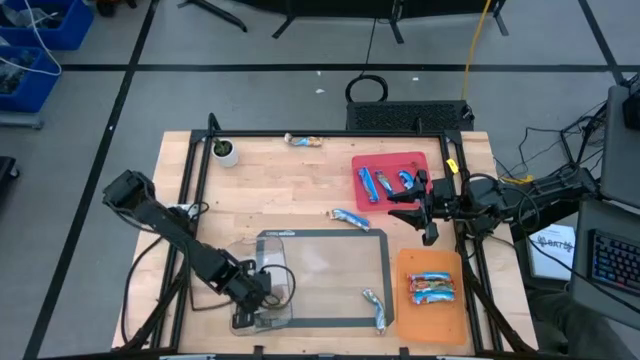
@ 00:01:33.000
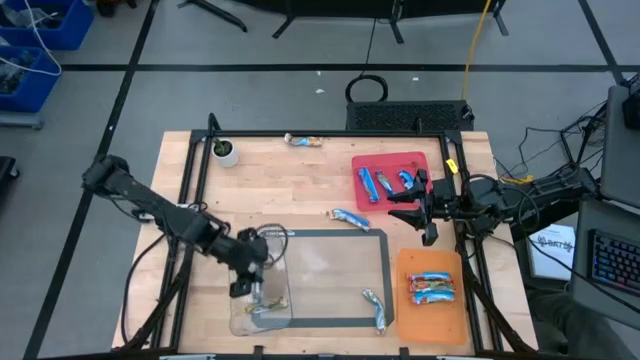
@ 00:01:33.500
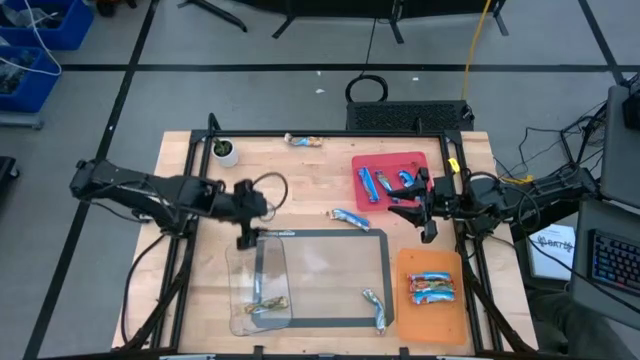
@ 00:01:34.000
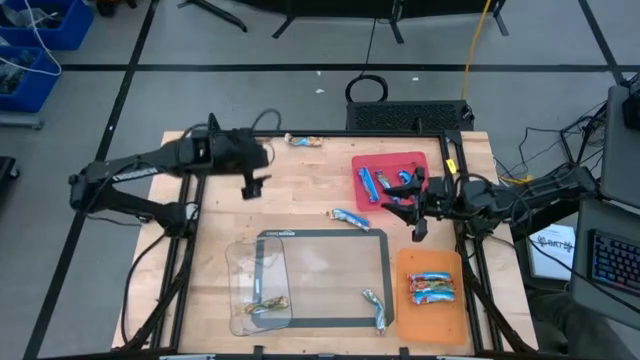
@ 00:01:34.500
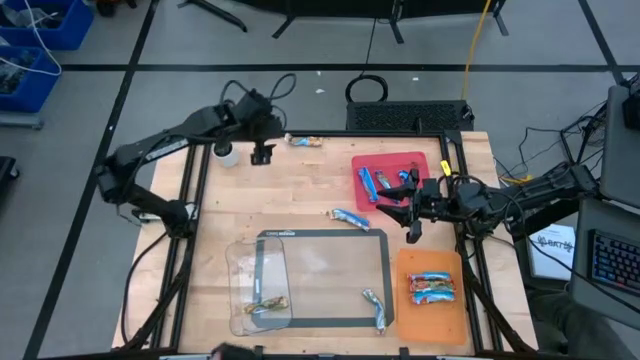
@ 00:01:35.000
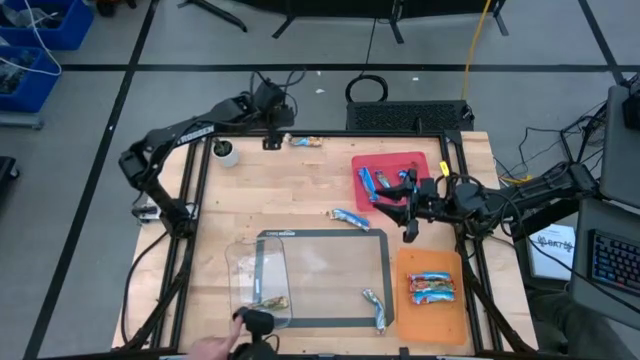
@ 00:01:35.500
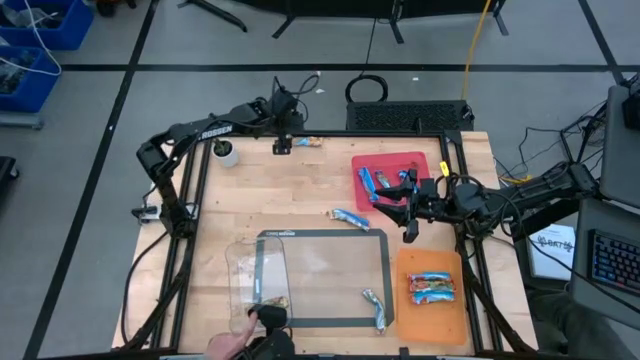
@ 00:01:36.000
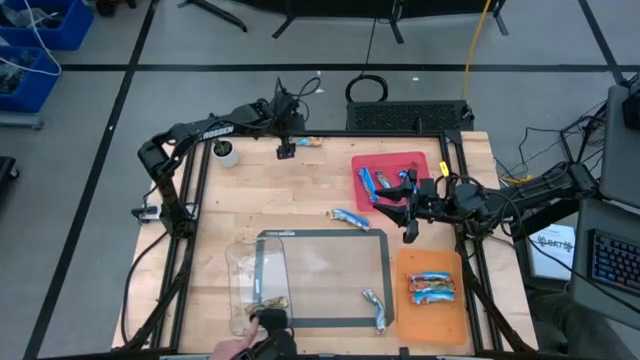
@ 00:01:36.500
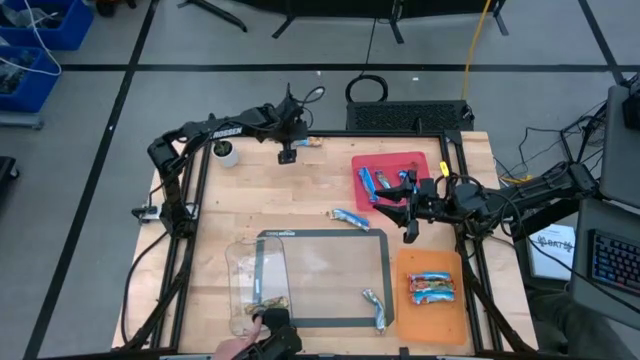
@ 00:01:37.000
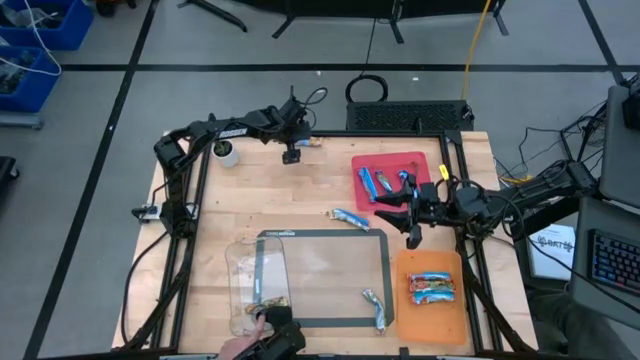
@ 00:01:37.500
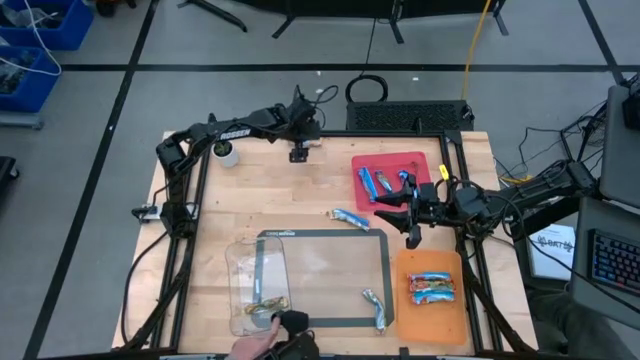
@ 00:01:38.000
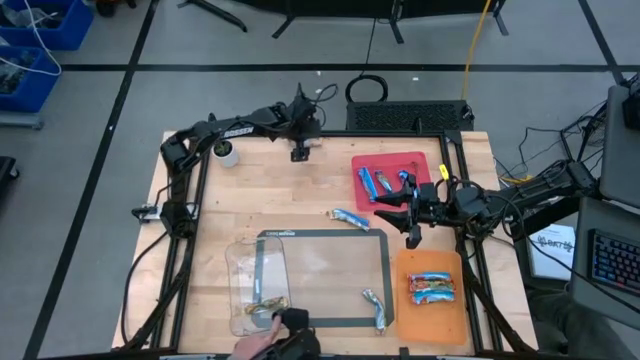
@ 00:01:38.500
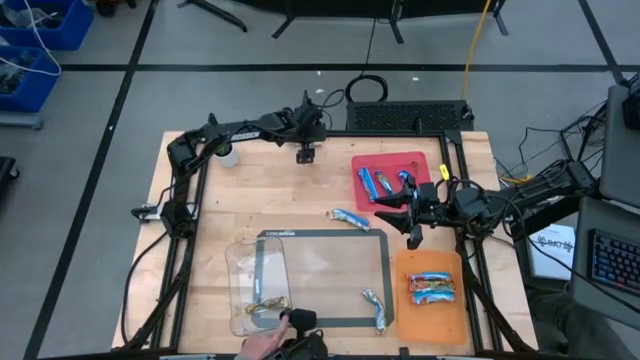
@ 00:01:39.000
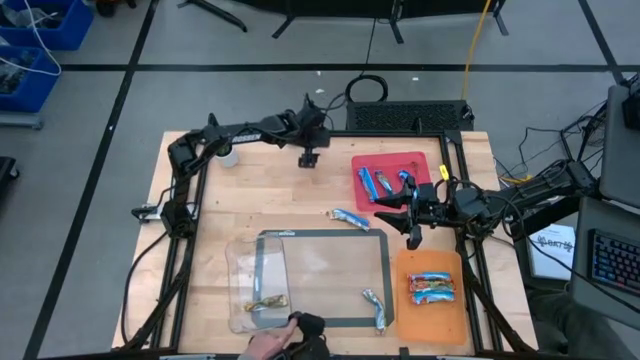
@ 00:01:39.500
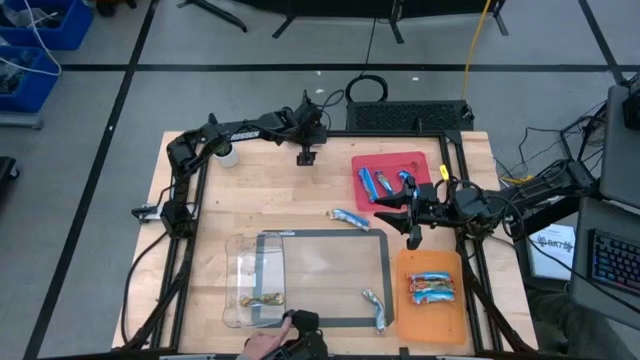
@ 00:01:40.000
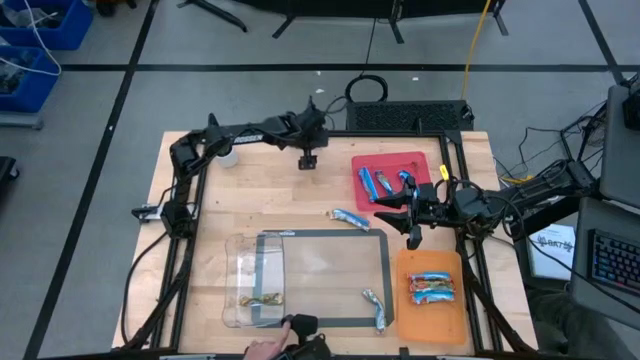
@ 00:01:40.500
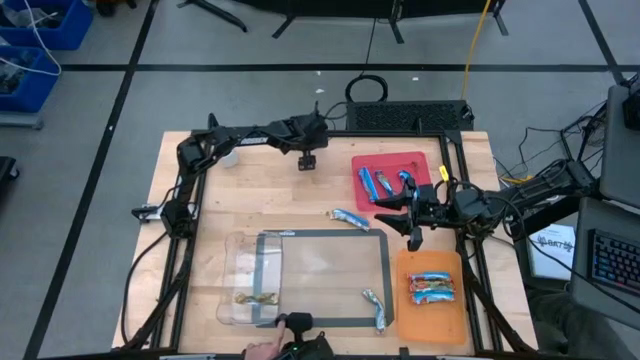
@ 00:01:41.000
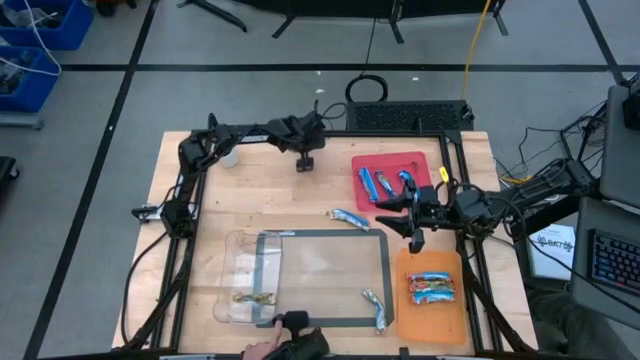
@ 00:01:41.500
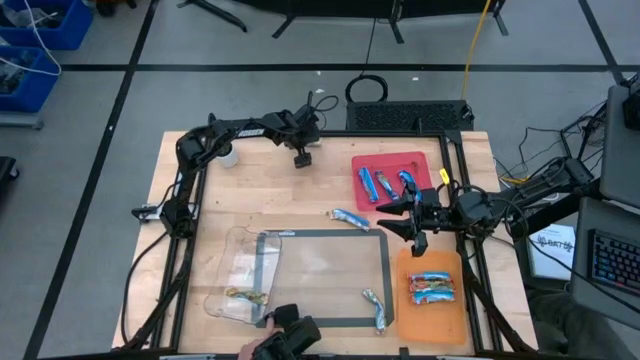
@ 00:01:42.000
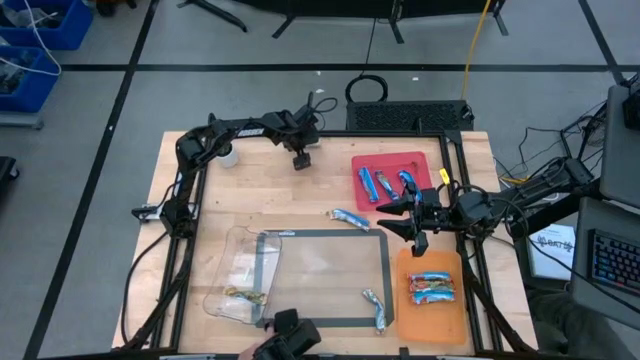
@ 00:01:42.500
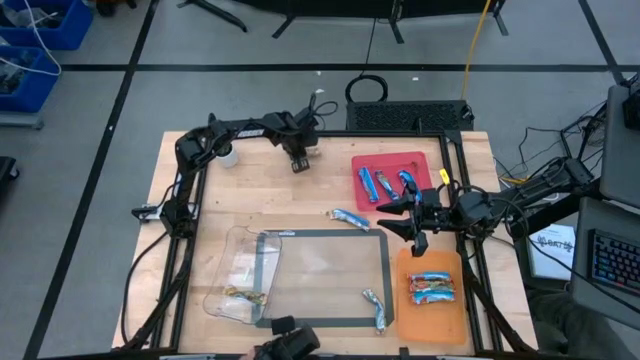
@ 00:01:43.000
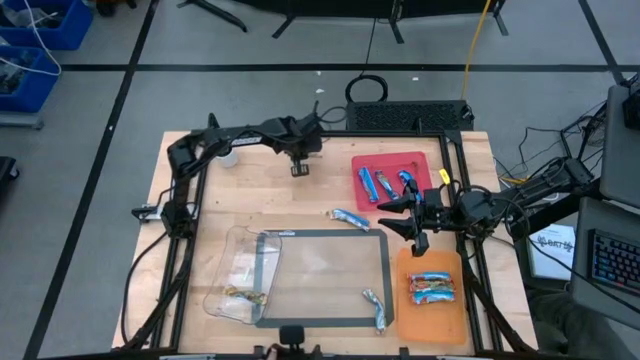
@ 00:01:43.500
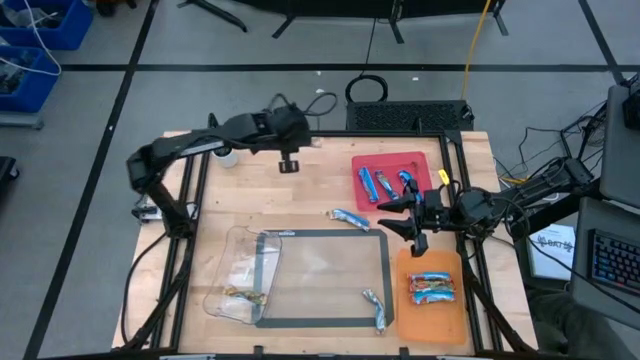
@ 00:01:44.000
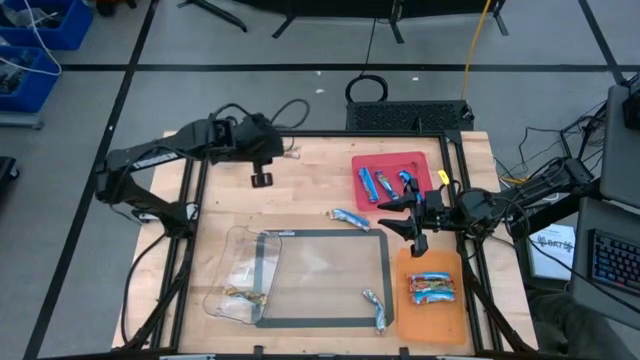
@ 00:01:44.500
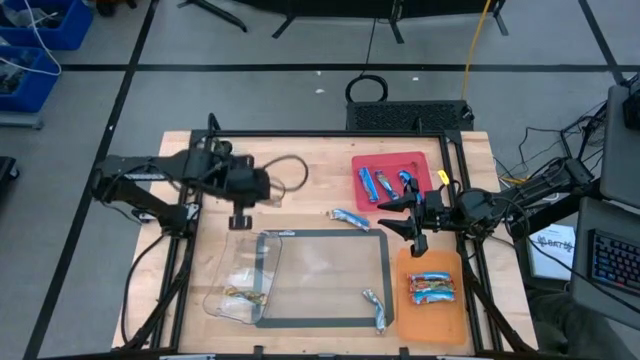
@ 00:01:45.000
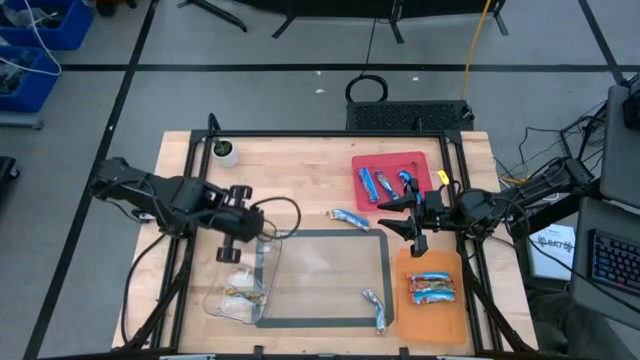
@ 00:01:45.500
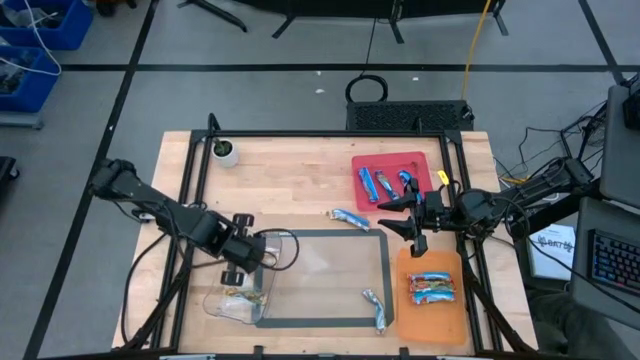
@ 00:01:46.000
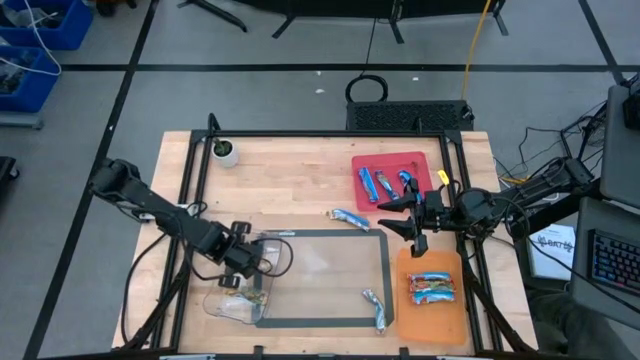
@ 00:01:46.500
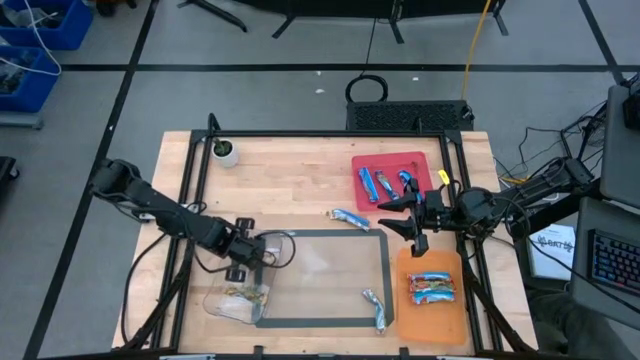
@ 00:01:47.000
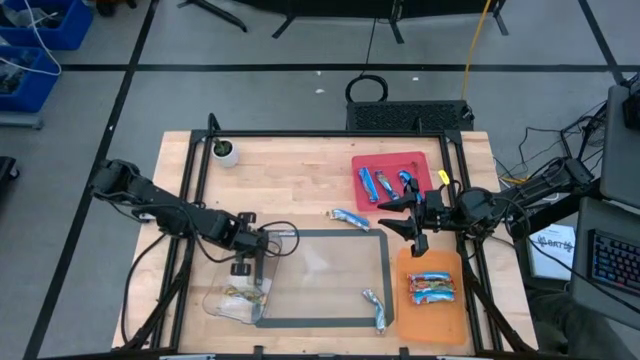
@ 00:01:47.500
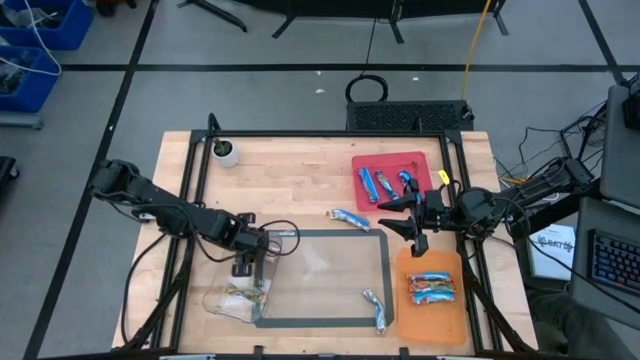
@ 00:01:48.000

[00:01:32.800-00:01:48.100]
Task: Pick and place Granola Bars by type
Put the yellow granola bar into the transparent bin

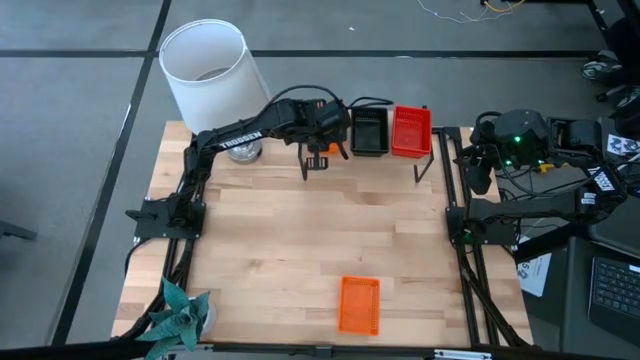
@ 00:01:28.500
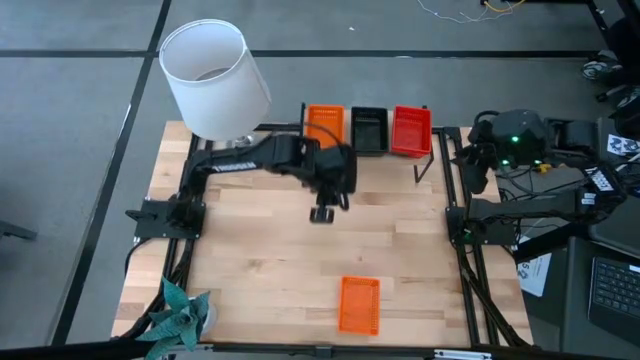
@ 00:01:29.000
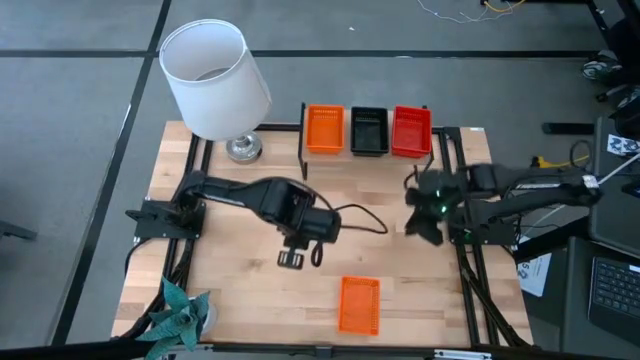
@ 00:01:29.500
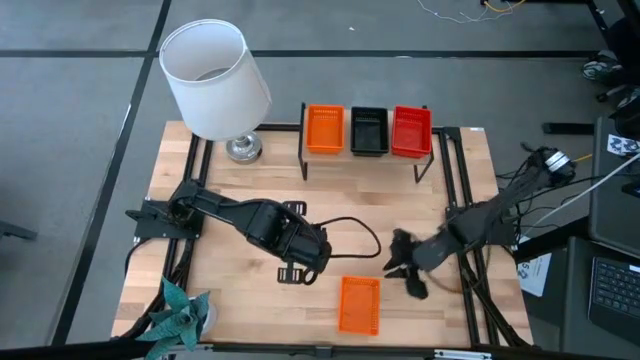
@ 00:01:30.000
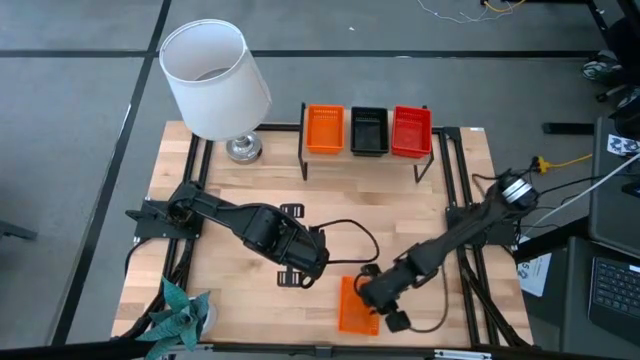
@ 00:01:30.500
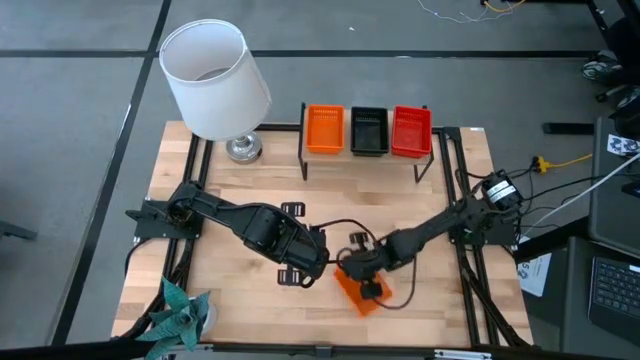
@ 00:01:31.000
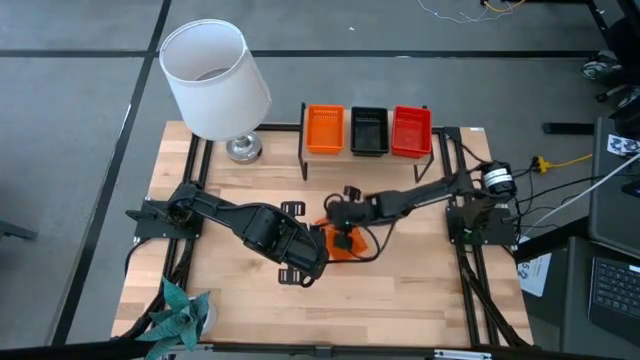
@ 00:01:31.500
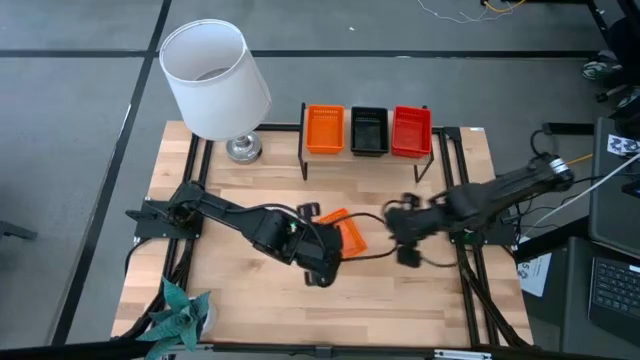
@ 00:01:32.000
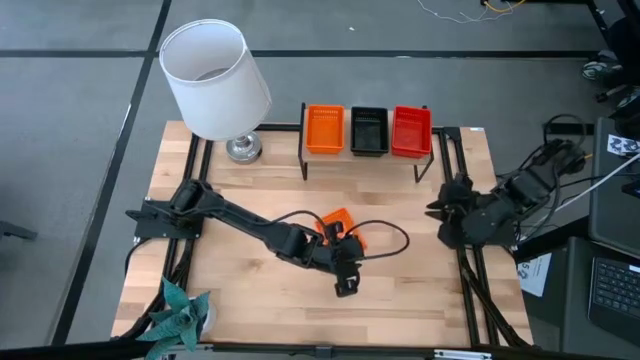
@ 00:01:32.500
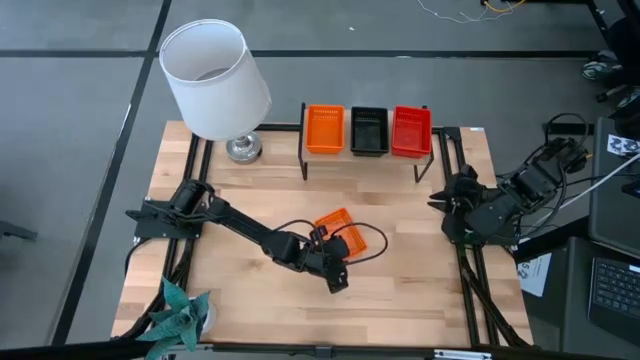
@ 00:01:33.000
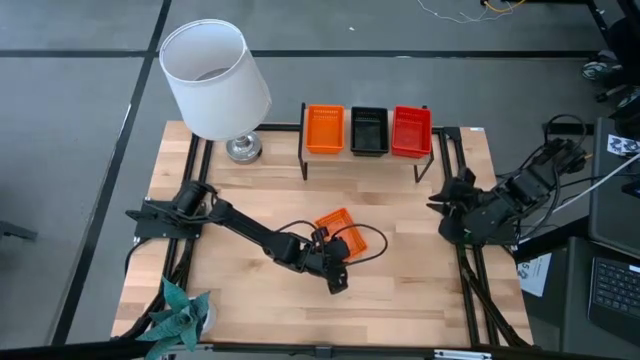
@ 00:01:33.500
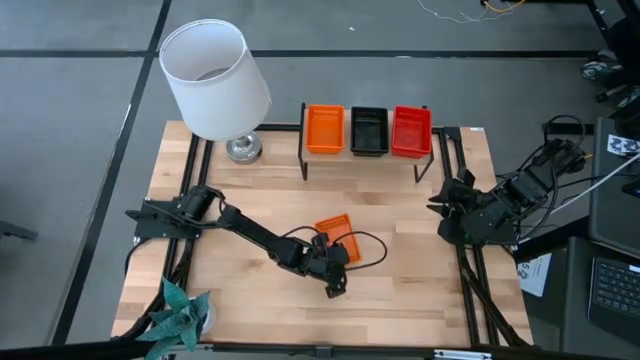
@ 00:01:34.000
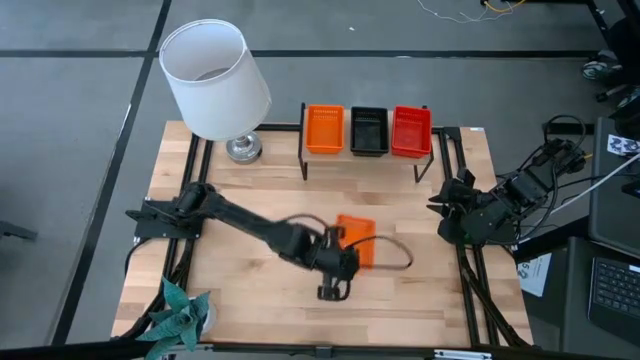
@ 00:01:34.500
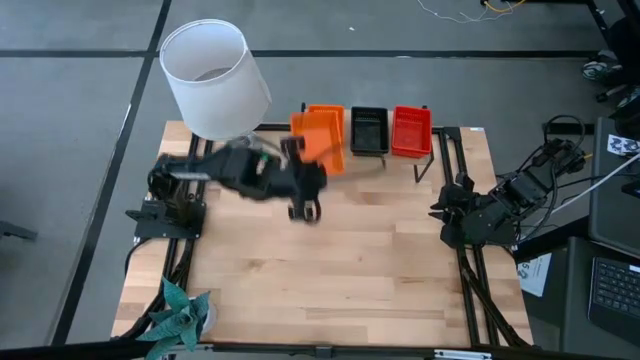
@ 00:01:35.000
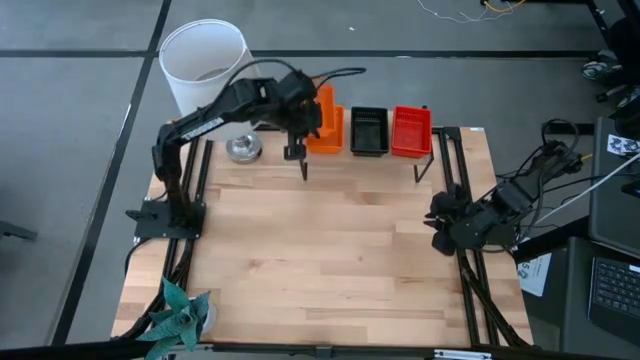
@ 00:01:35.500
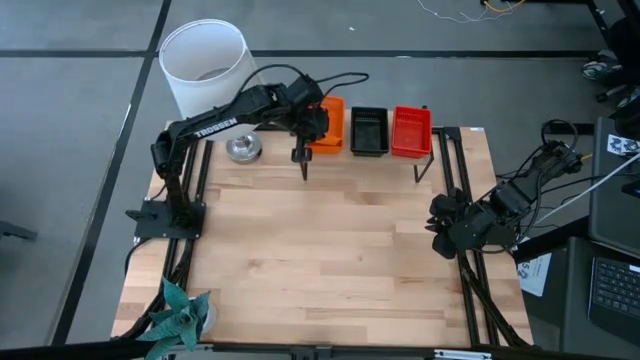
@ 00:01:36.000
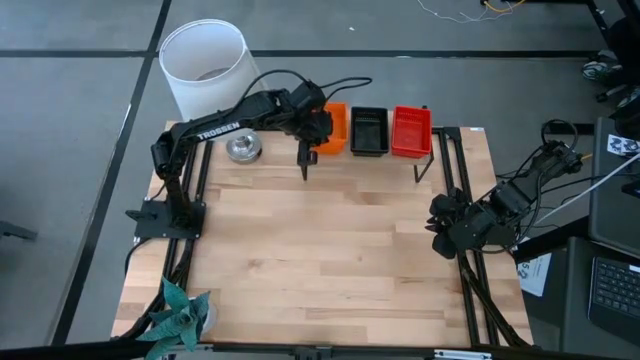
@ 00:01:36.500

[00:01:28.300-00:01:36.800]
Task: Stack baskets on shelf by color
Stack the orange bin on the orange bin on the shelf
